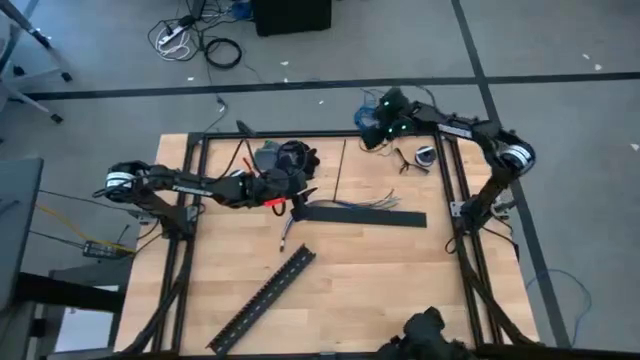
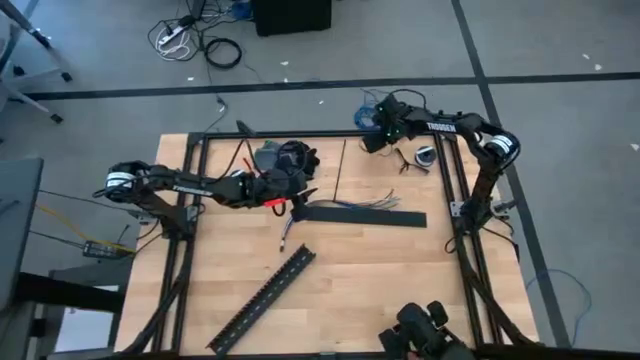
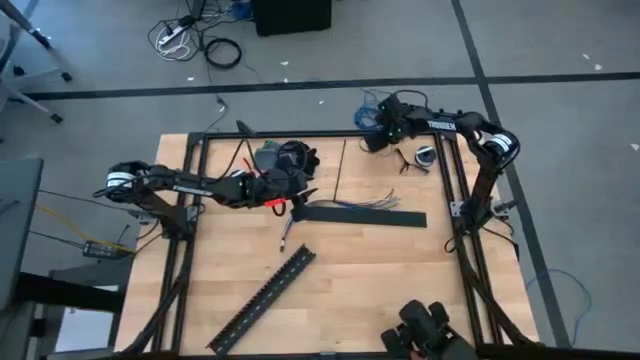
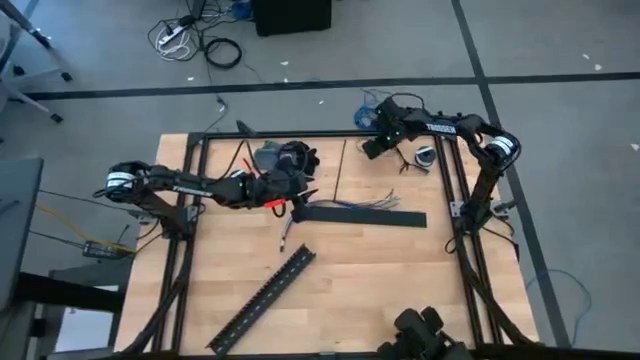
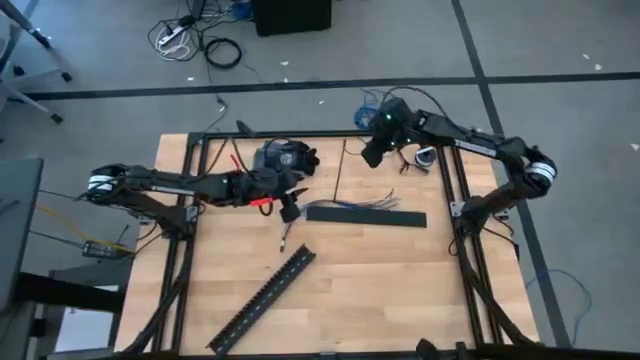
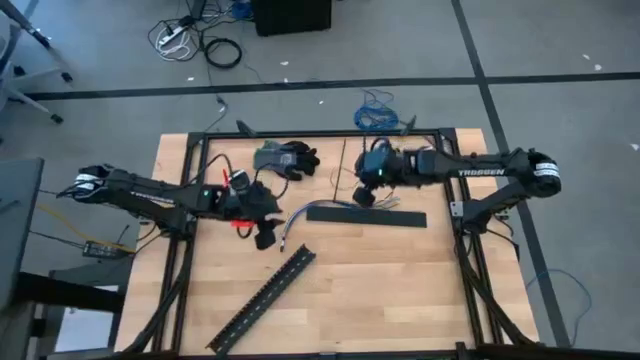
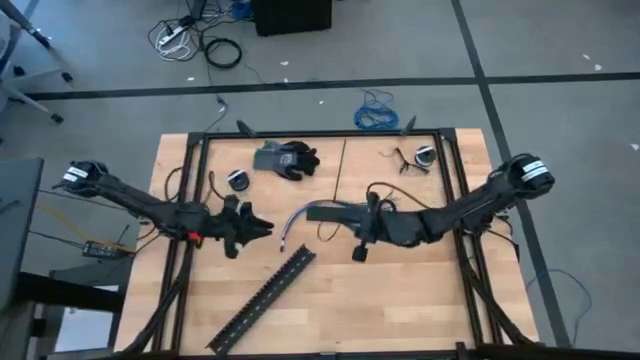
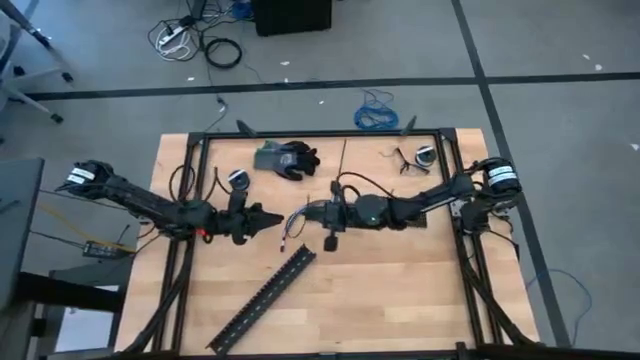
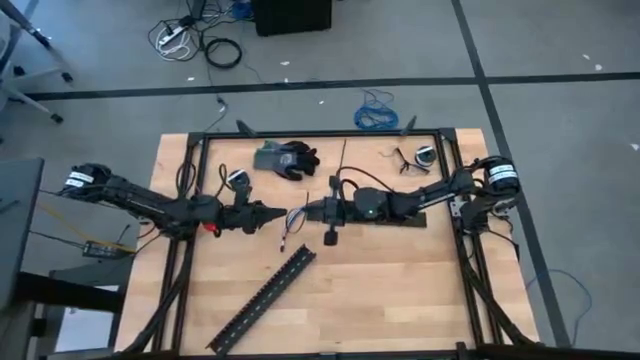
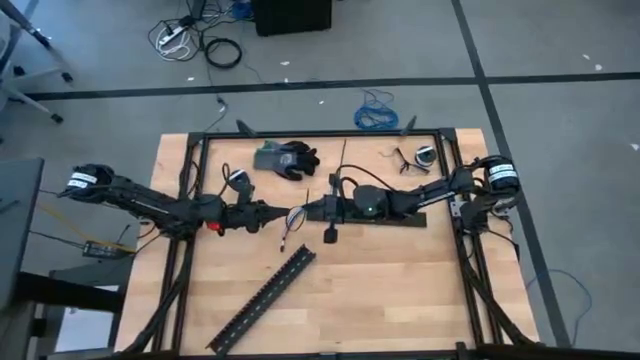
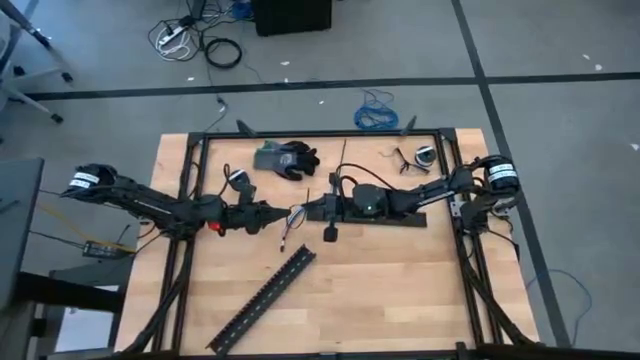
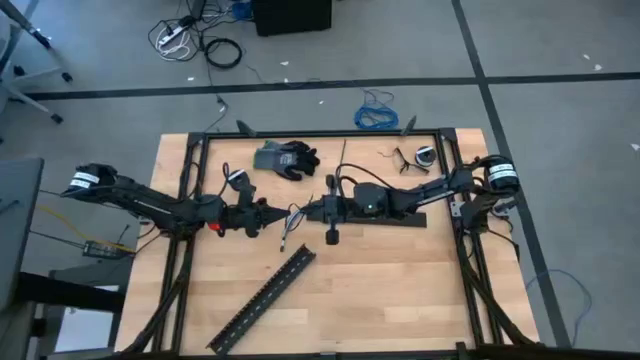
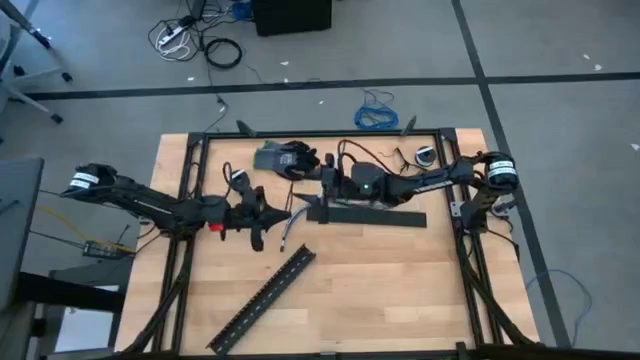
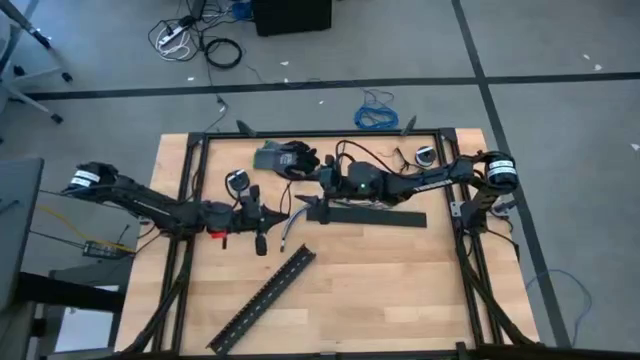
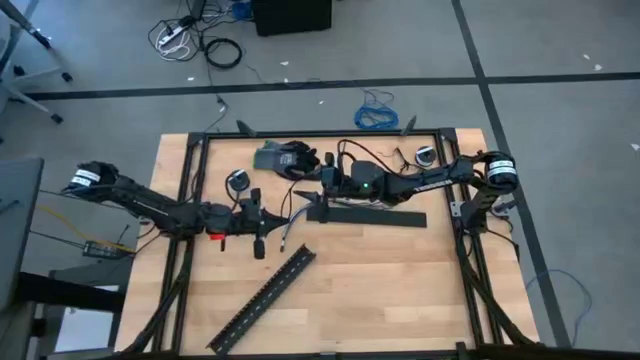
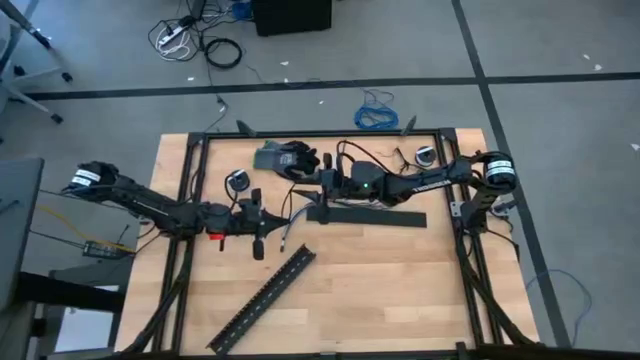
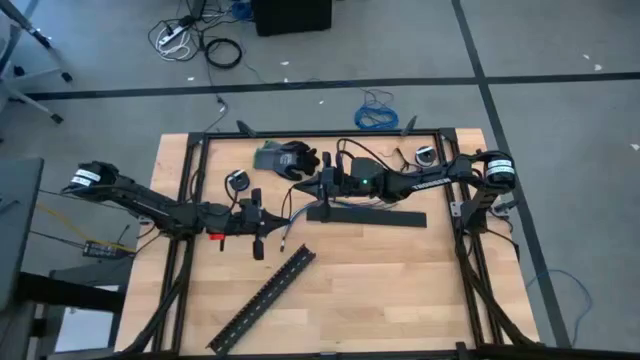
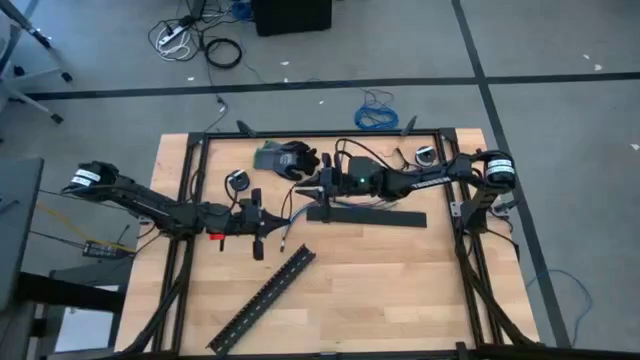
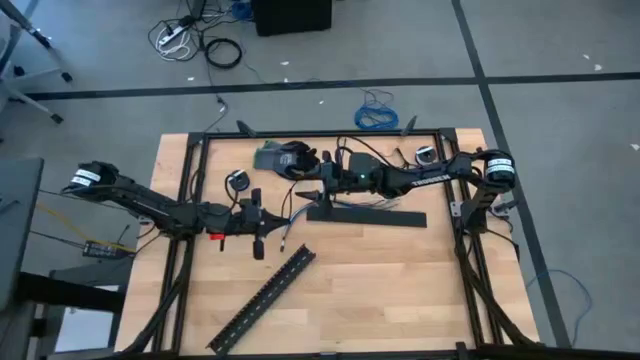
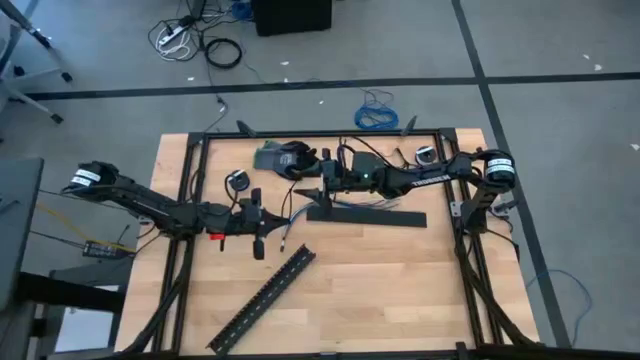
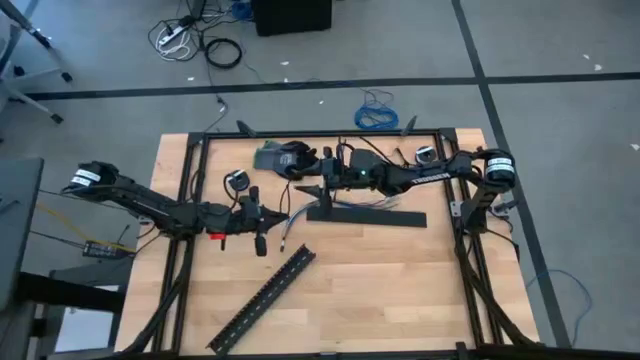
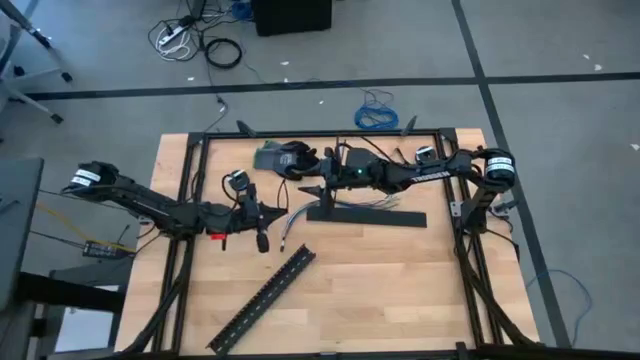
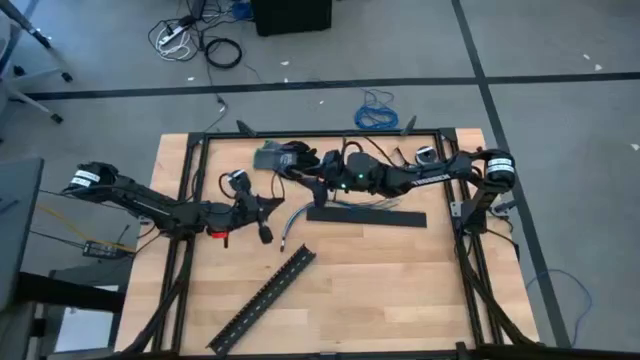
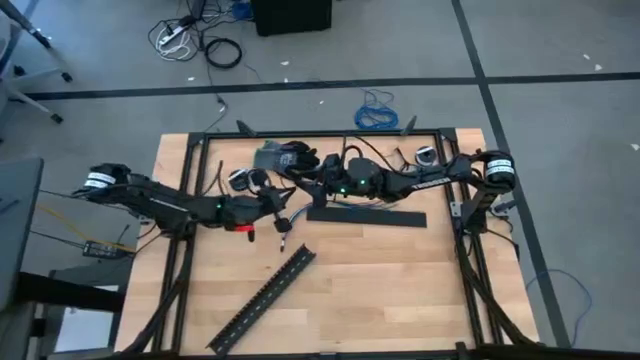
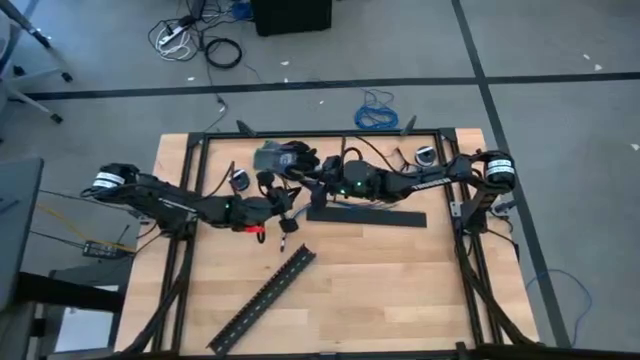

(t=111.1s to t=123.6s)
Task: Ziptie cables
Wrap the cable wires with the black zip tie

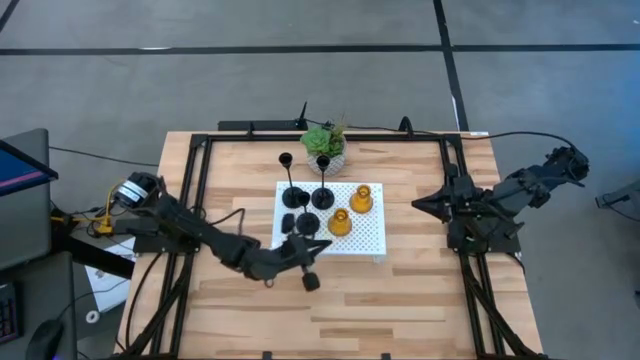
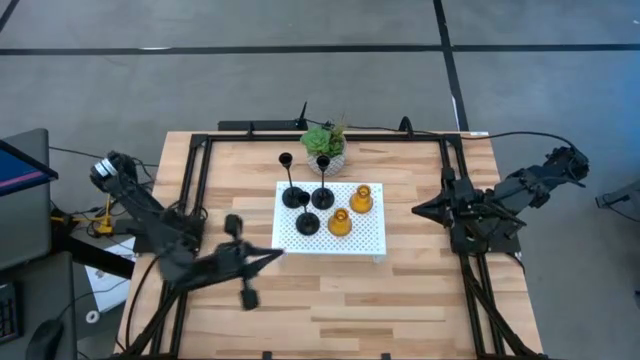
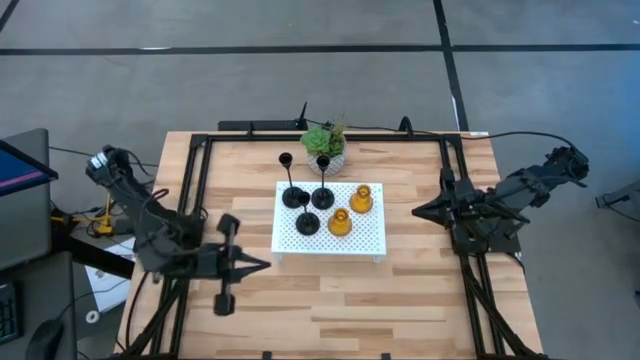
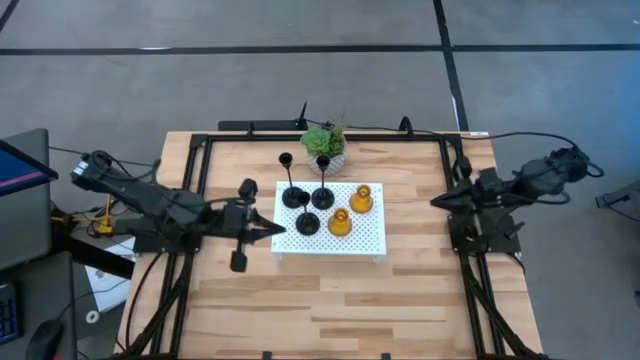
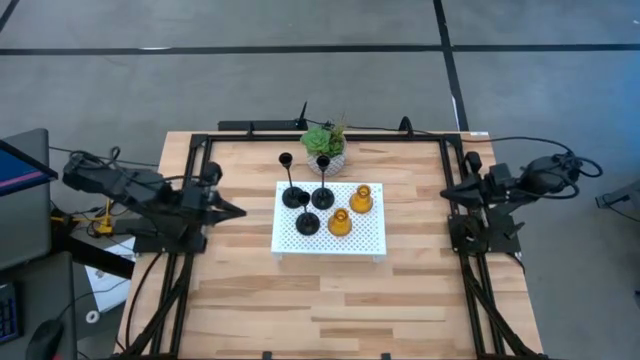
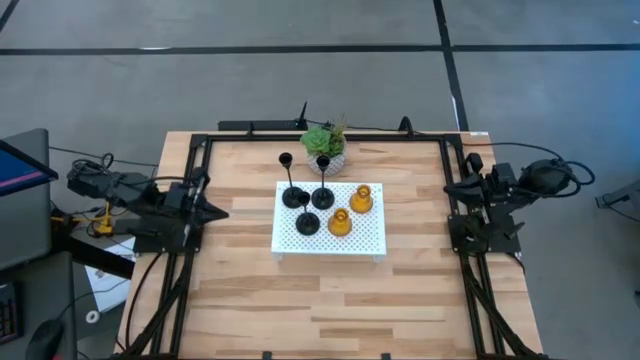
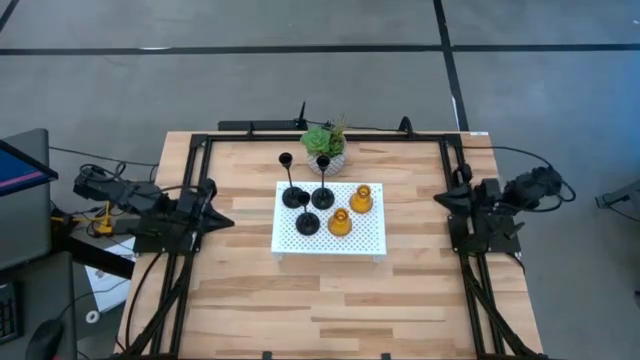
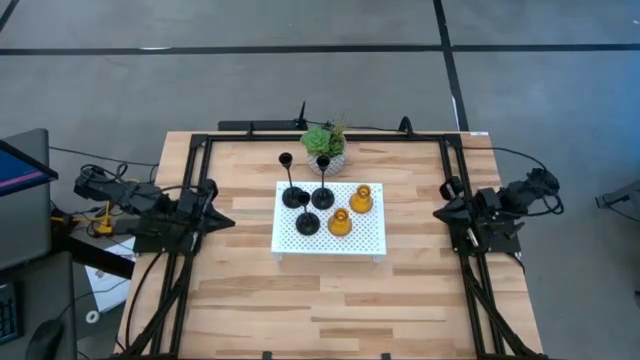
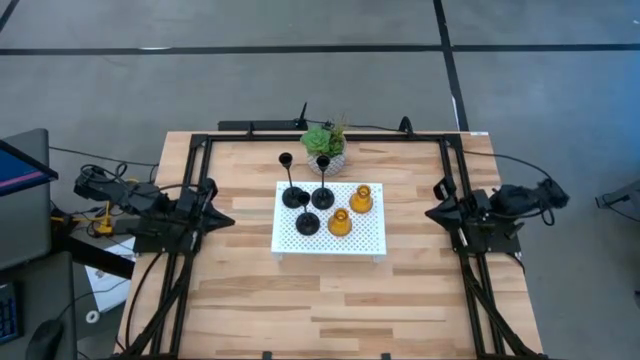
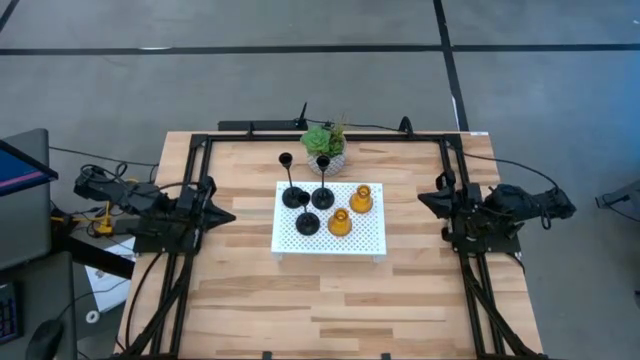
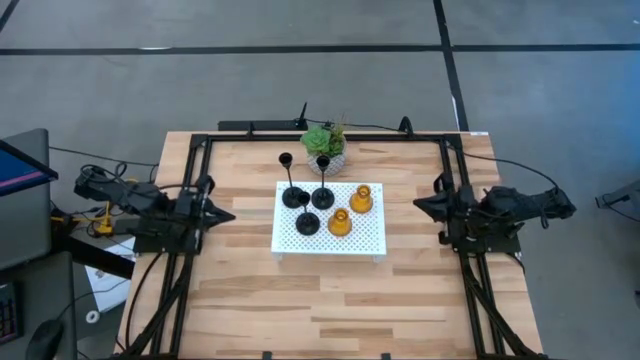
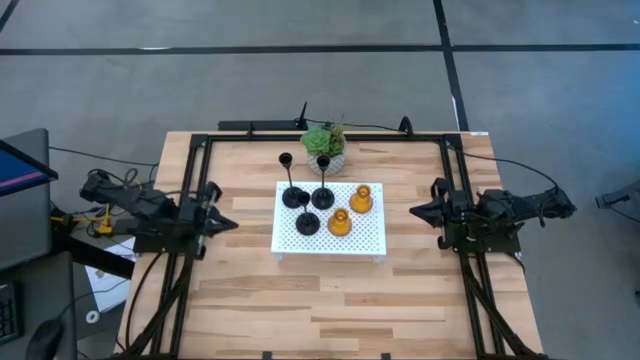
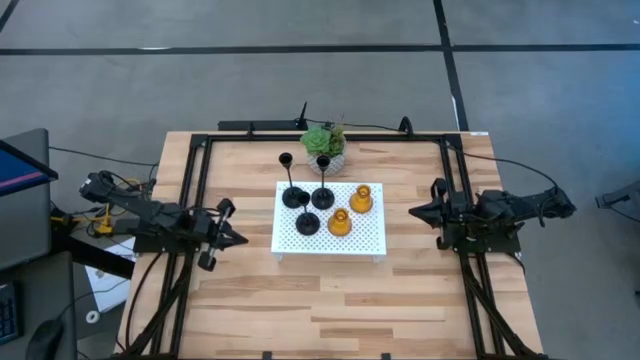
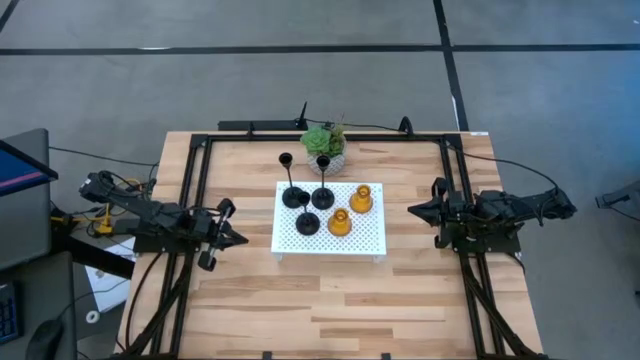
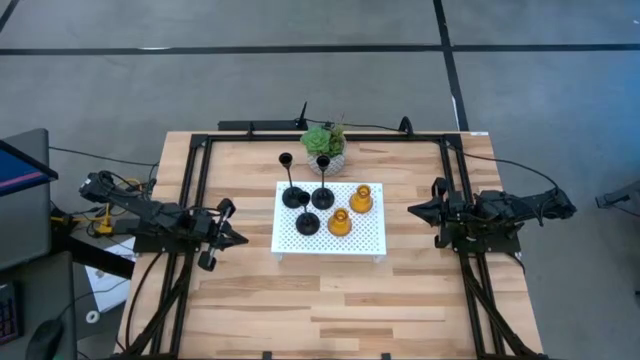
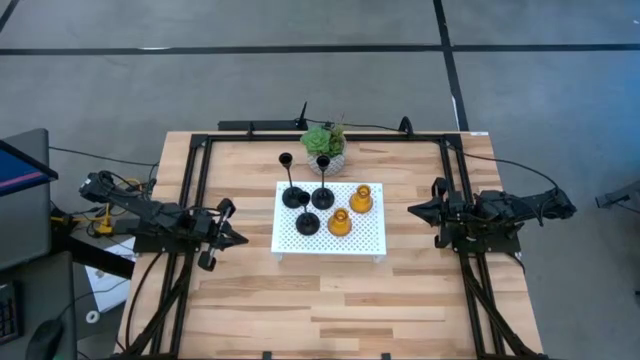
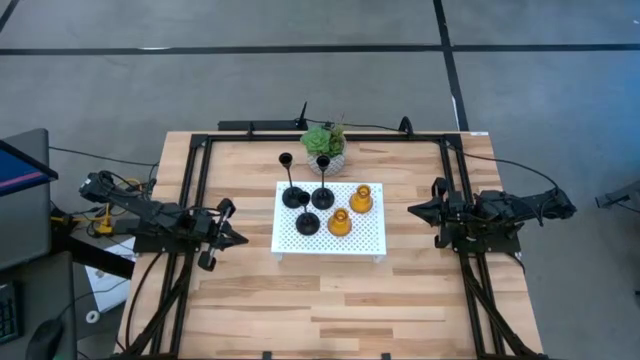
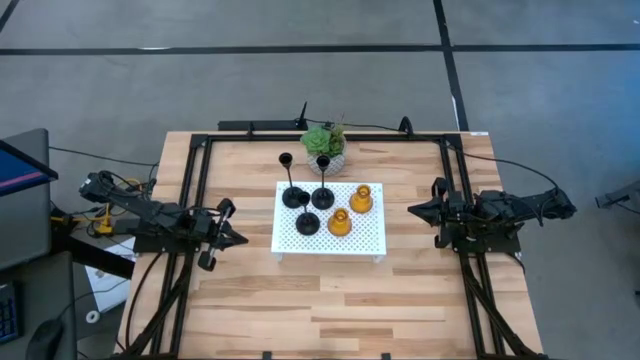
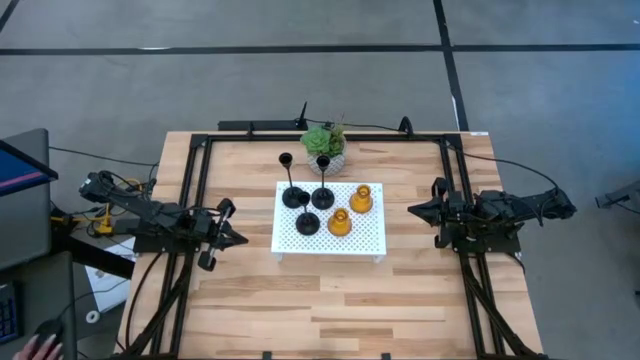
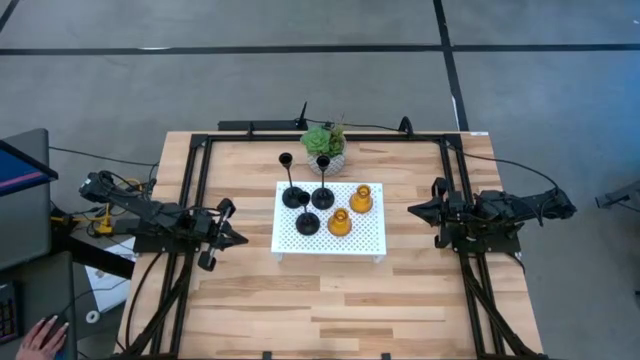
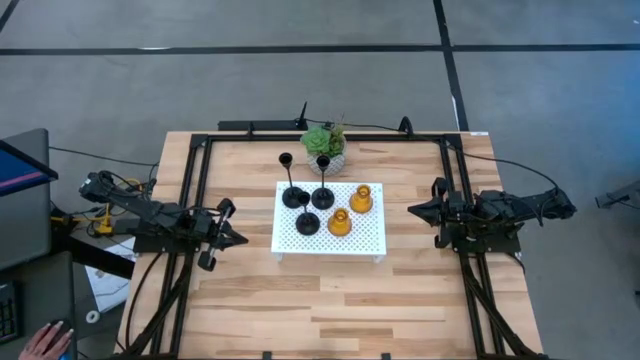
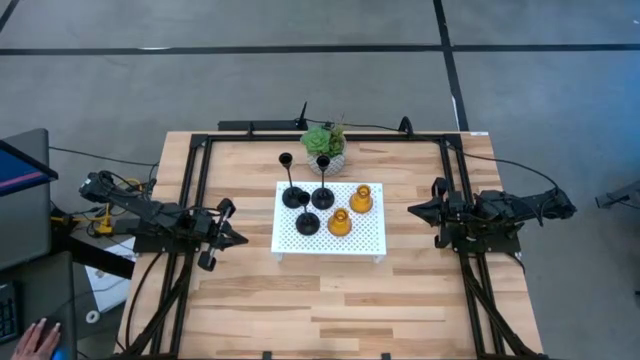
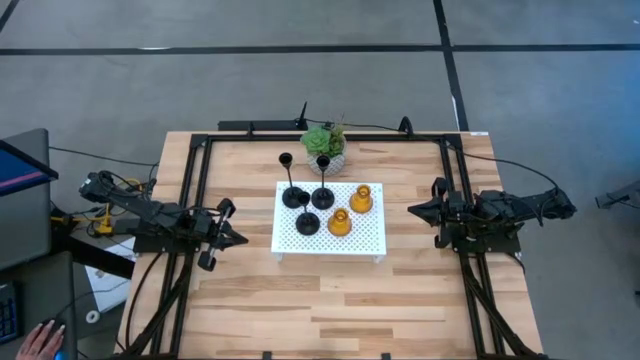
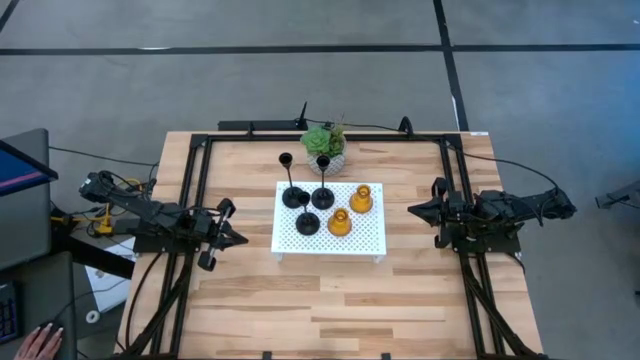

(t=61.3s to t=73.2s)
Task: Pick & Place candle stick holders
Return to Home Position
